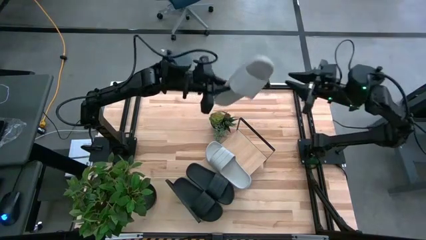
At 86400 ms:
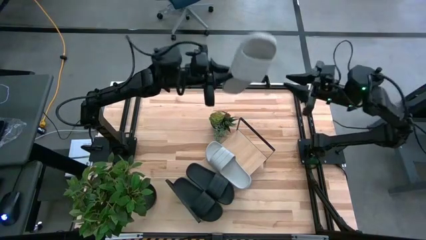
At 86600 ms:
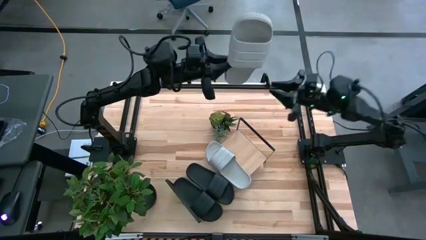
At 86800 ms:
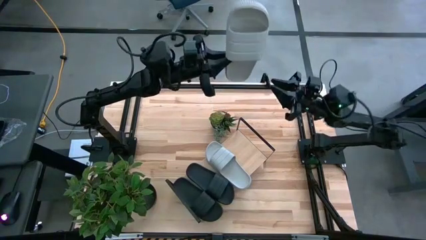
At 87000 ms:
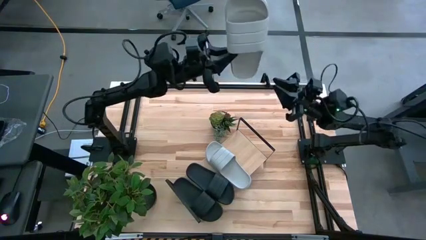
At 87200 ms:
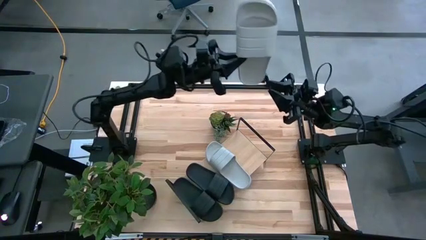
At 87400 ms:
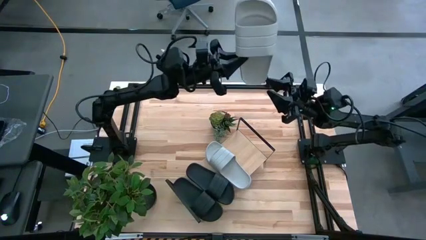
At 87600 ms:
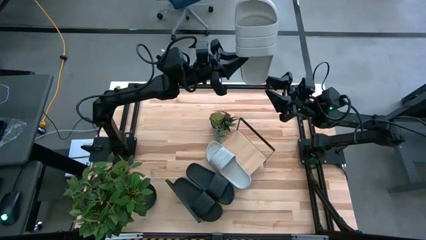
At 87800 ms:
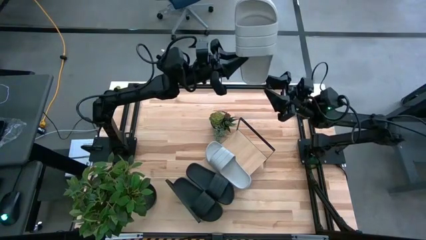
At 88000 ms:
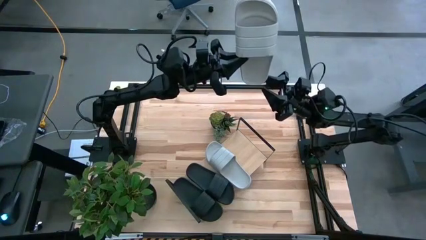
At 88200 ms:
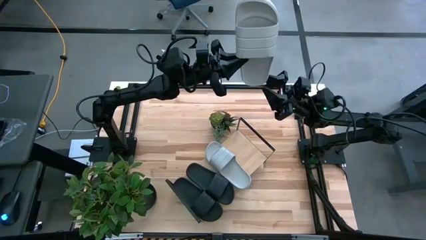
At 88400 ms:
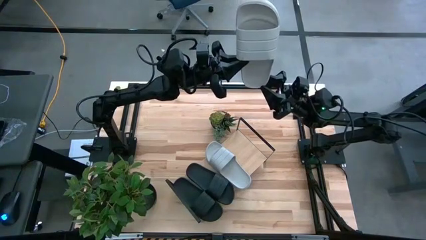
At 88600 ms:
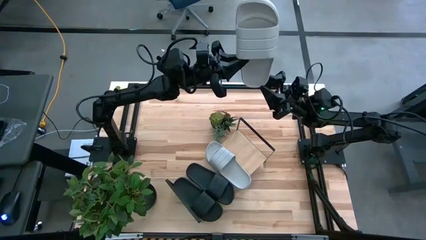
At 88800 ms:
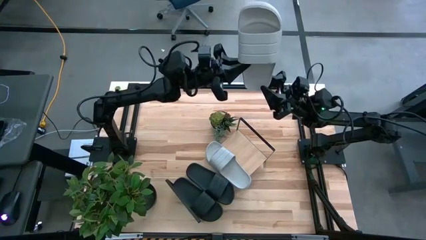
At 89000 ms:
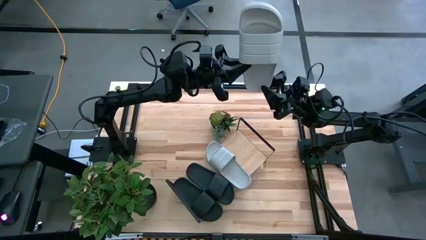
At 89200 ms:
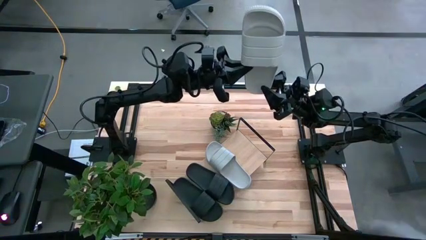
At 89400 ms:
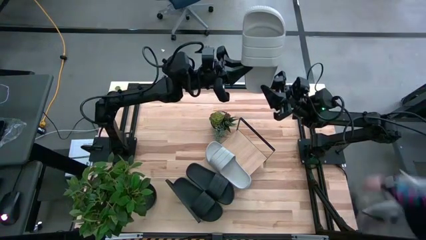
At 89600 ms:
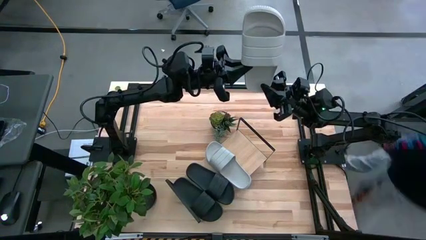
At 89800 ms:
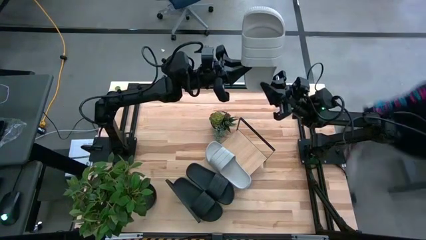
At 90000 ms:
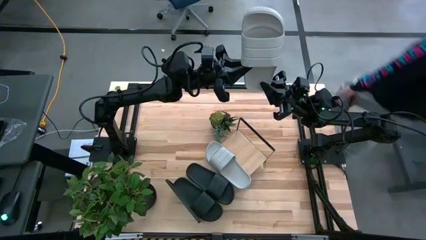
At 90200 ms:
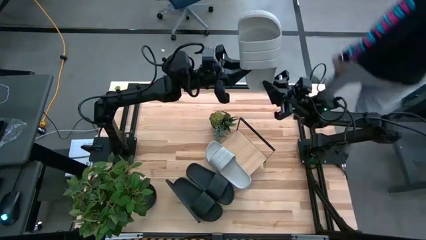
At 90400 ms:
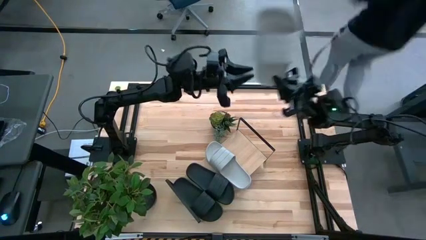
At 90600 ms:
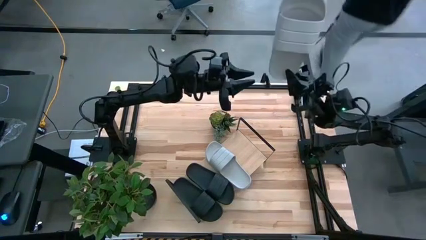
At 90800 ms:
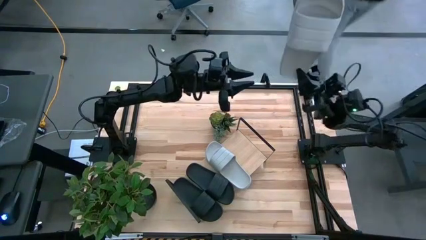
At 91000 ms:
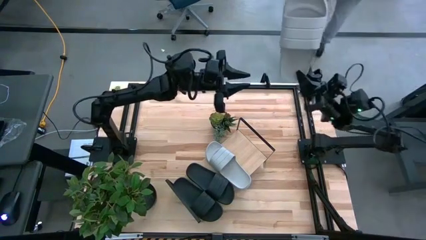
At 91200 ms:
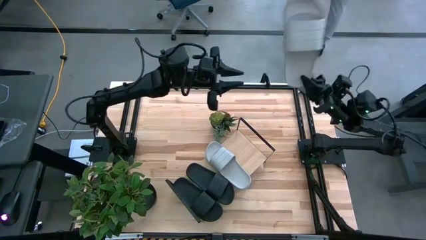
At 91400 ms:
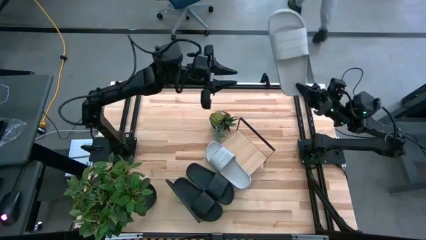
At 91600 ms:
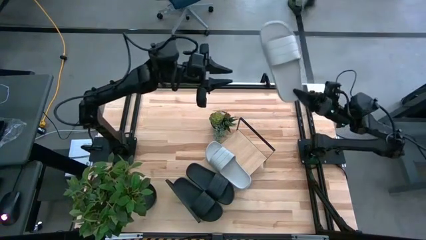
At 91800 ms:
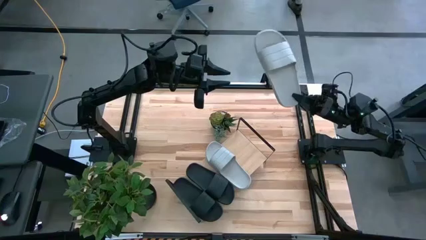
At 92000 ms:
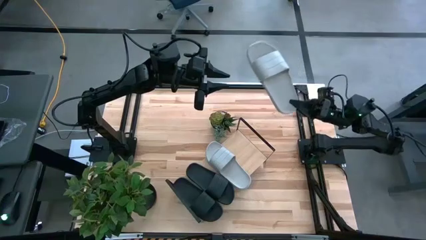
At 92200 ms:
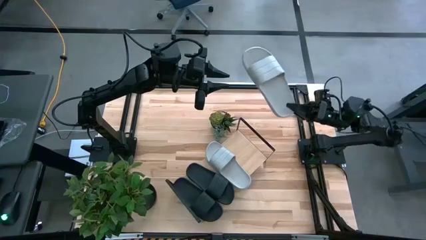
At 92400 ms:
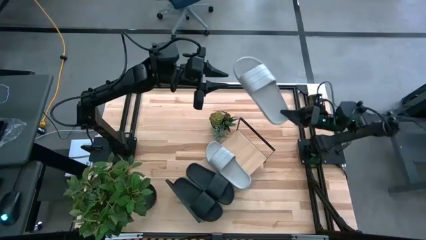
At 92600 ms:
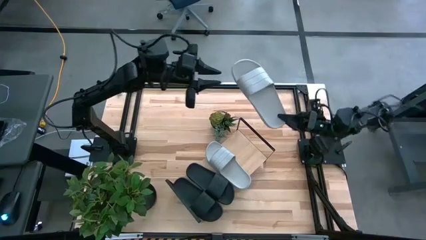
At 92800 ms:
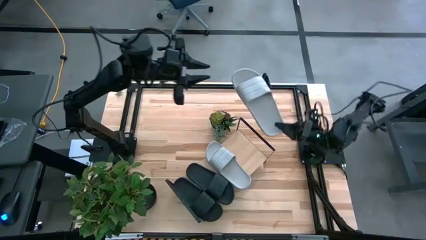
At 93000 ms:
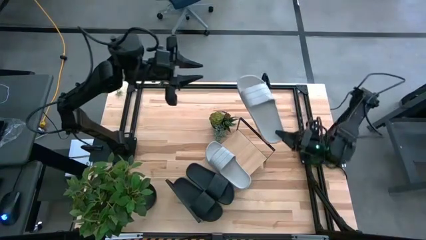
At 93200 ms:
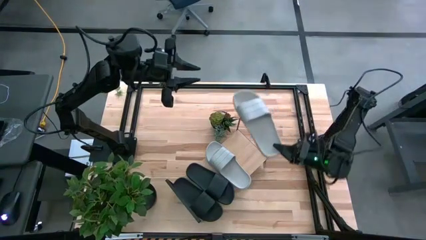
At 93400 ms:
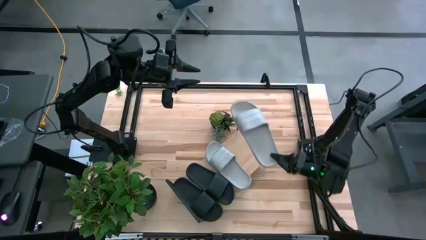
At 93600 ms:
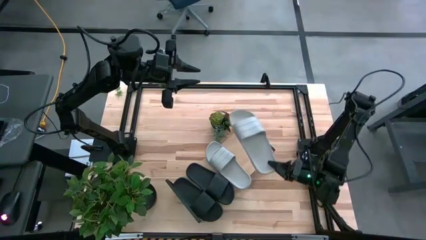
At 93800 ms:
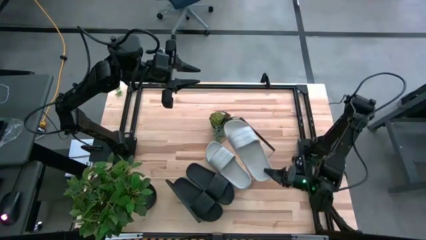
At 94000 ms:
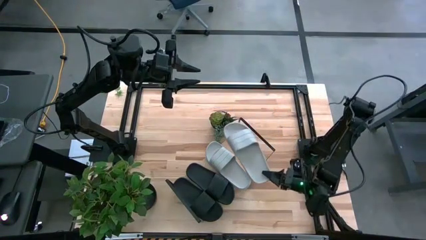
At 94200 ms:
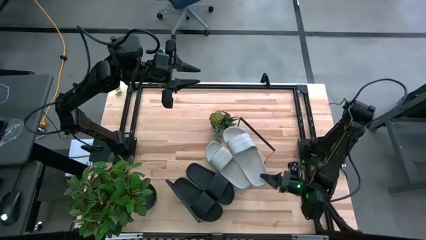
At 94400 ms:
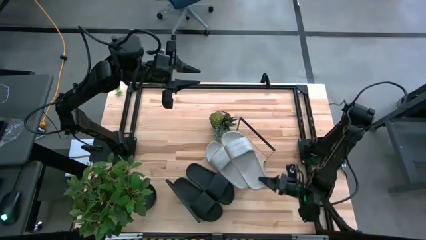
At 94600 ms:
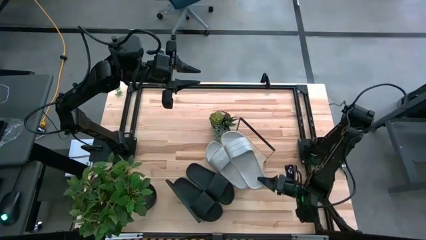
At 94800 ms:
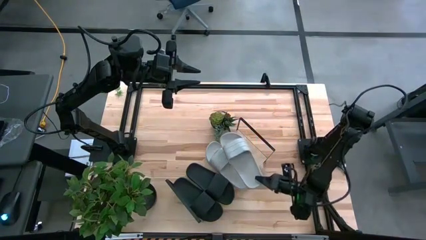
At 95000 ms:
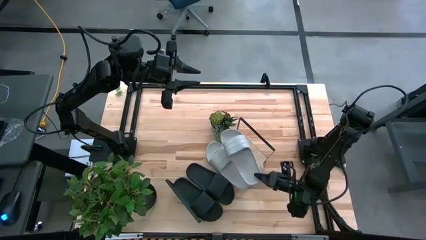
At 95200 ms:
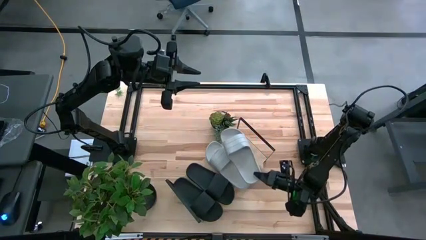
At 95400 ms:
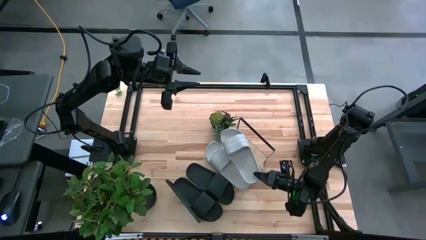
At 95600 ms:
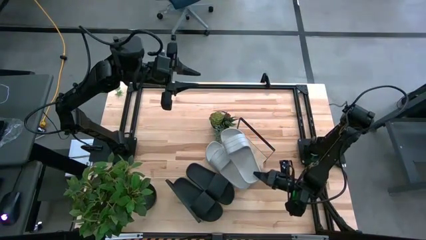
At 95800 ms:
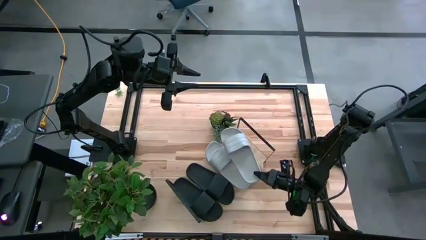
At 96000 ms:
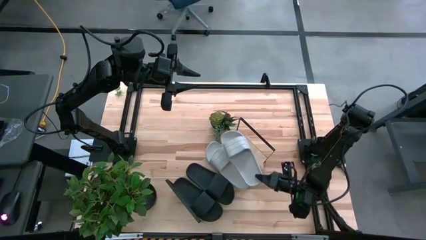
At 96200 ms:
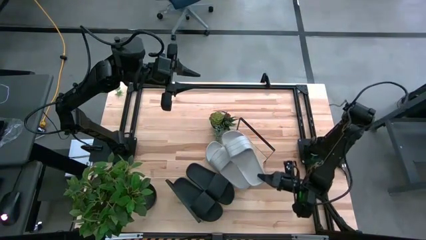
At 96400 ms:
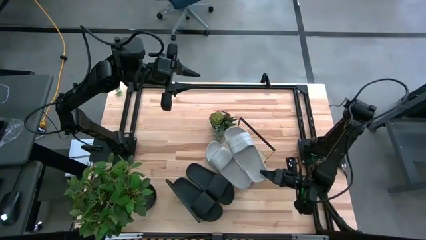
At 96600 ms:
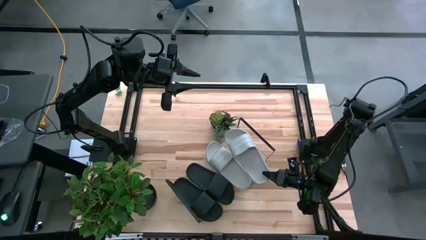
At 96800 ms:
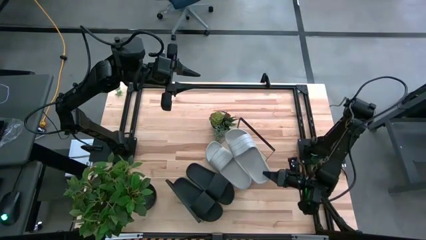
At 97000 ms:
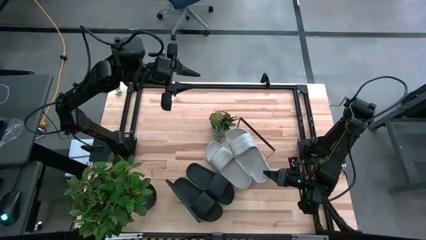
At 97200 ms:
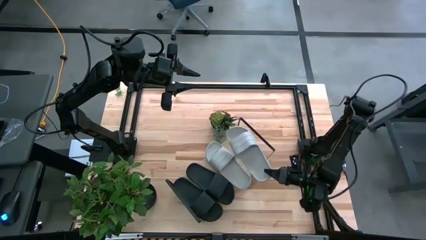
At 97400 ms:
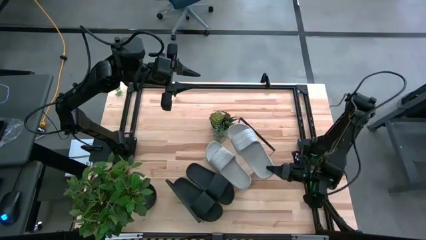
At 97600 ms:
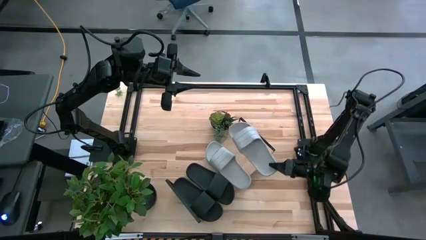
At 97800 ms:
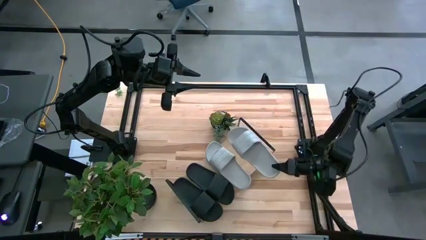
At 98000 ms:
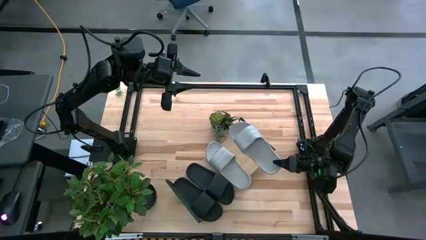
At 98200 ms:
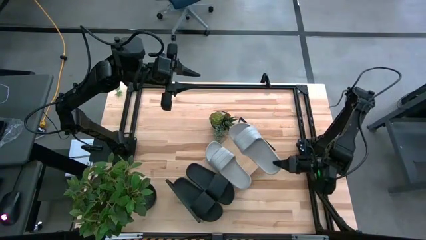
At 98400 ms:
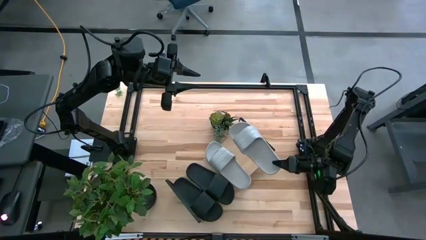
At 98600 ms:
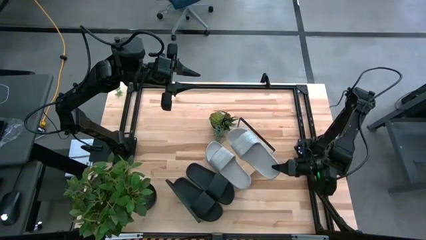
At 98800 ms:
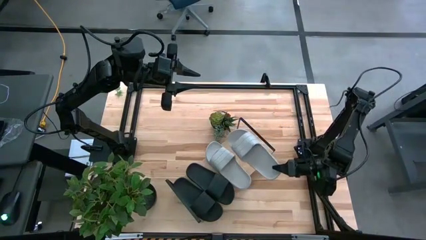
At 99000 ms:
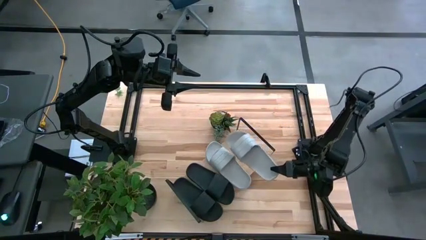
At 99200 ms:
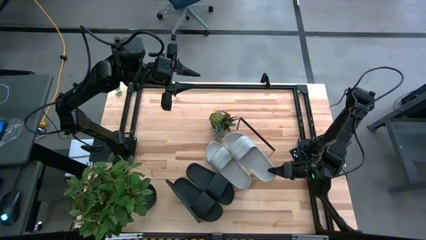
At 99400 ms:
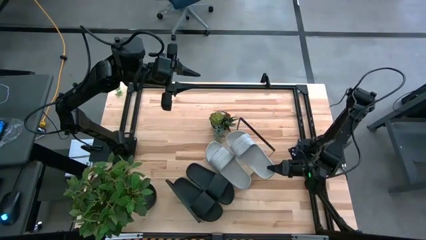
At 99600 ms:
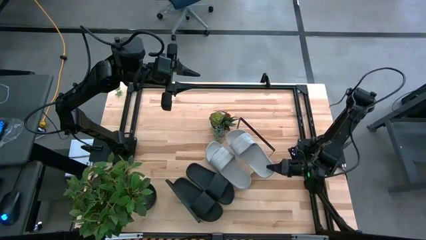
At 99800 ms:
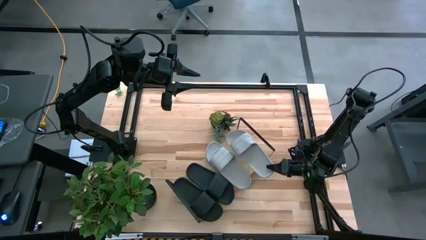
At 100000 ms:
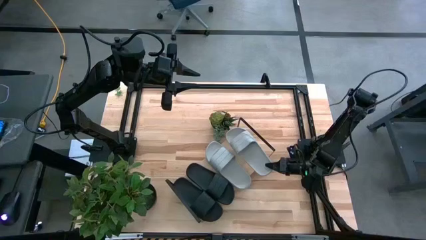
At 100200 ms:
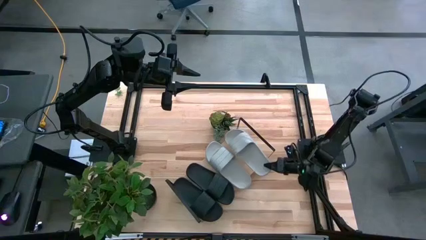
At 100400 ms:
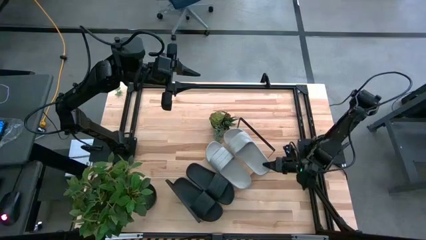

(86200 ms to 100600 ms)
Task: Pick and place slides into the shelf
Put the gray slipper on the shelf
